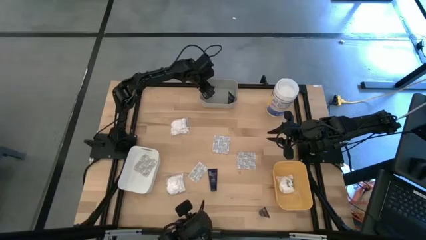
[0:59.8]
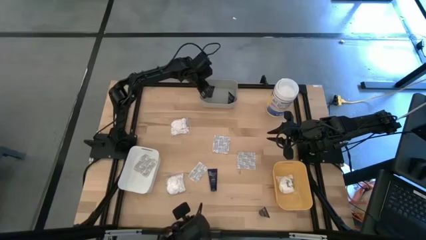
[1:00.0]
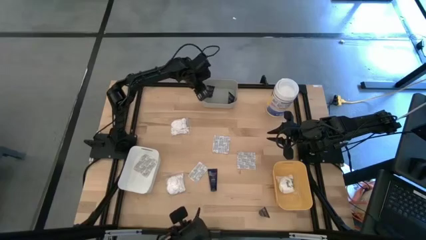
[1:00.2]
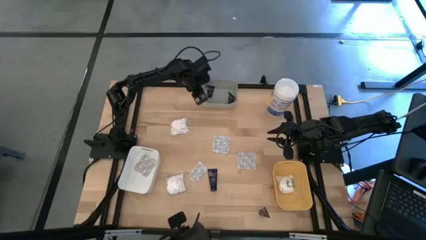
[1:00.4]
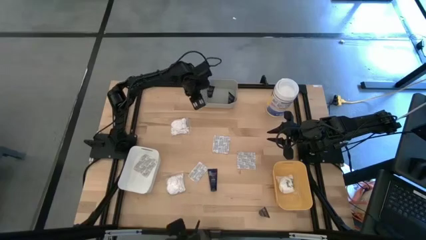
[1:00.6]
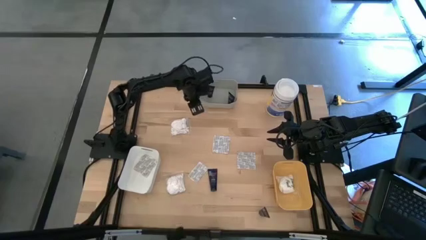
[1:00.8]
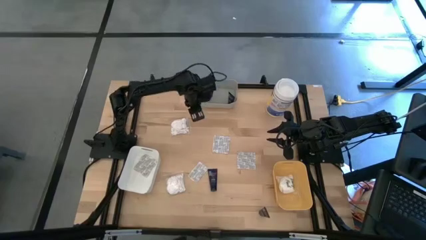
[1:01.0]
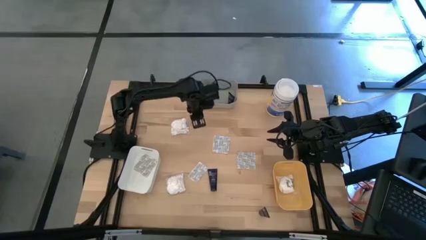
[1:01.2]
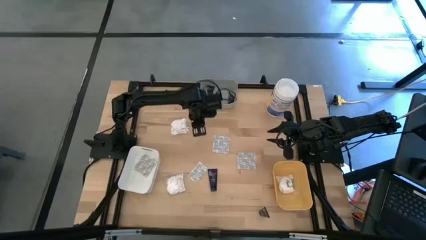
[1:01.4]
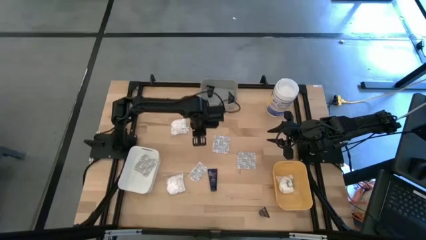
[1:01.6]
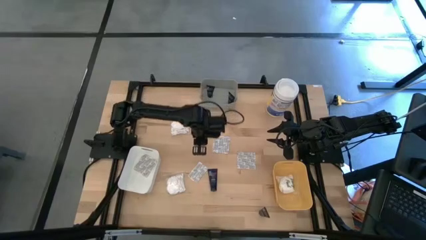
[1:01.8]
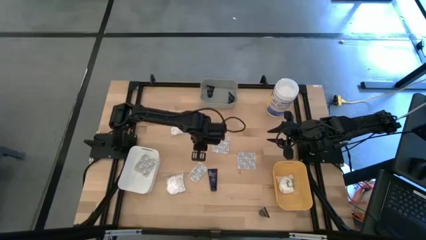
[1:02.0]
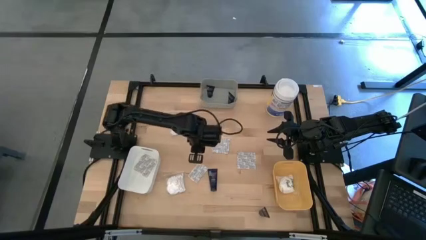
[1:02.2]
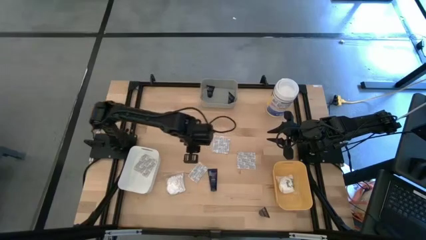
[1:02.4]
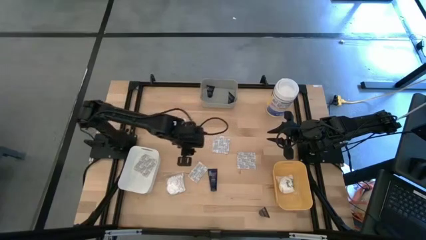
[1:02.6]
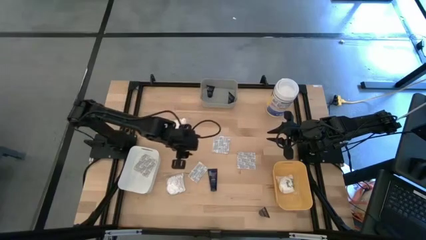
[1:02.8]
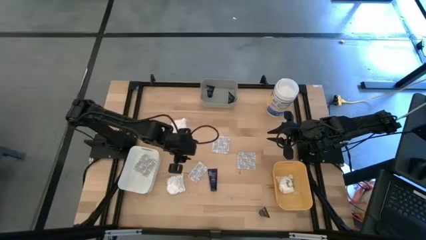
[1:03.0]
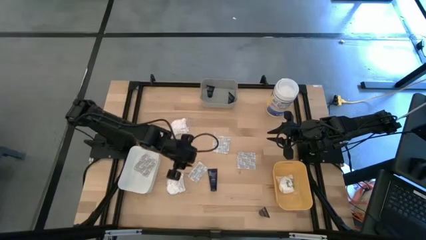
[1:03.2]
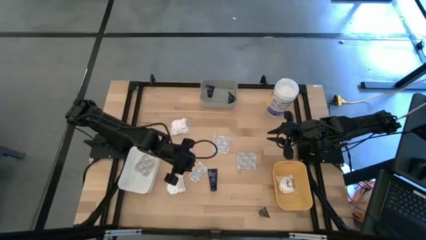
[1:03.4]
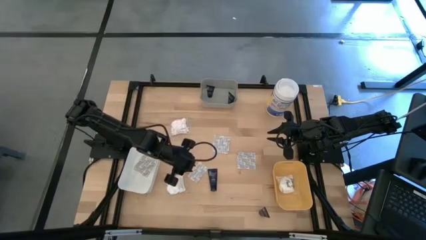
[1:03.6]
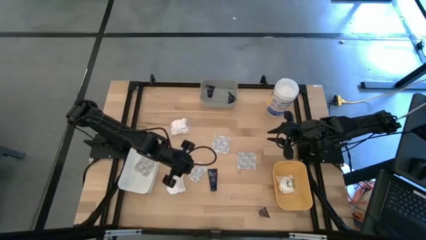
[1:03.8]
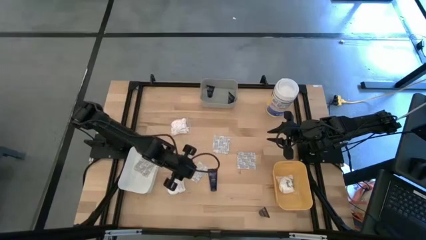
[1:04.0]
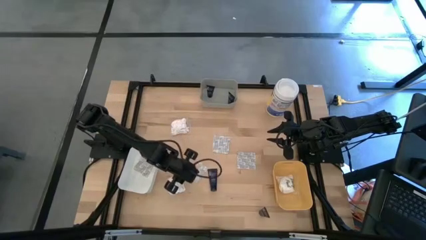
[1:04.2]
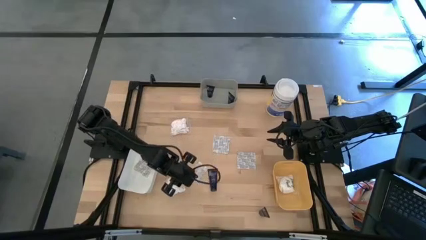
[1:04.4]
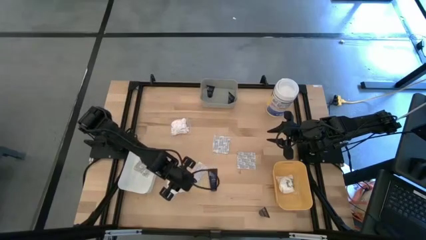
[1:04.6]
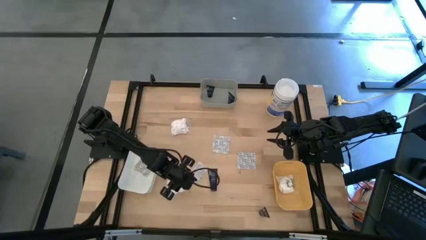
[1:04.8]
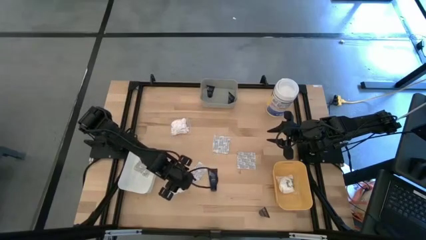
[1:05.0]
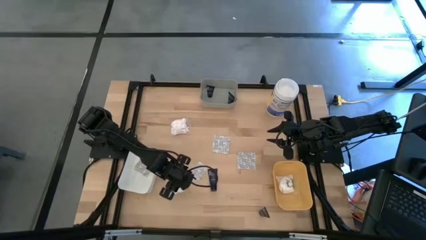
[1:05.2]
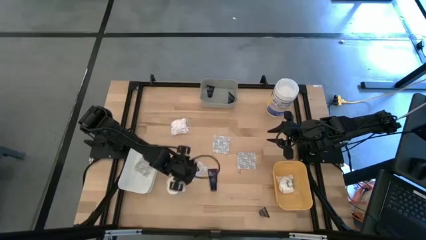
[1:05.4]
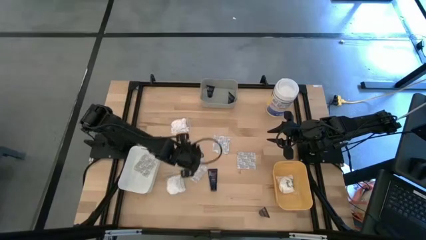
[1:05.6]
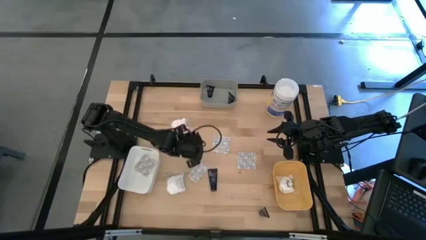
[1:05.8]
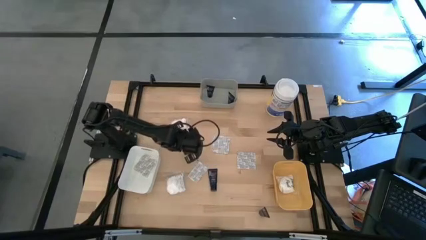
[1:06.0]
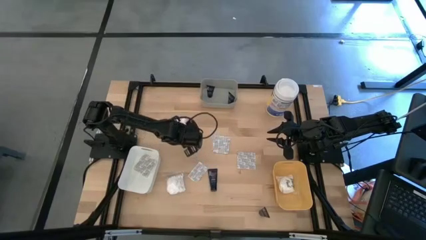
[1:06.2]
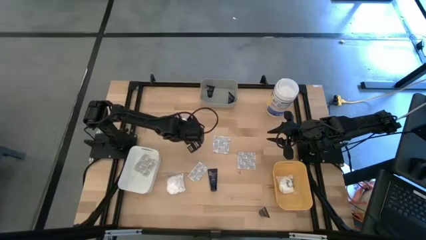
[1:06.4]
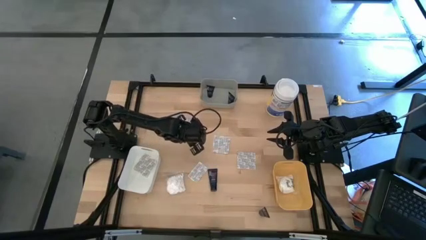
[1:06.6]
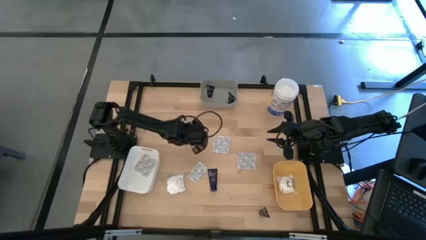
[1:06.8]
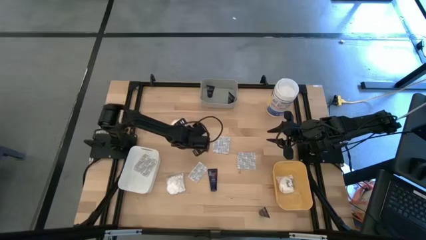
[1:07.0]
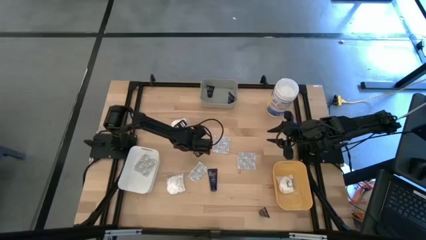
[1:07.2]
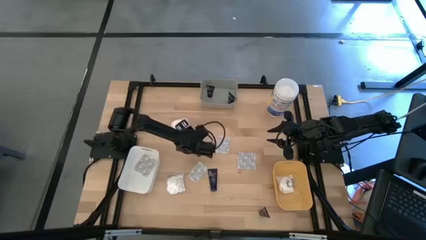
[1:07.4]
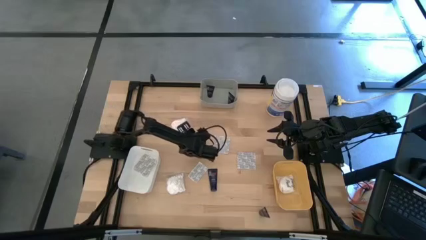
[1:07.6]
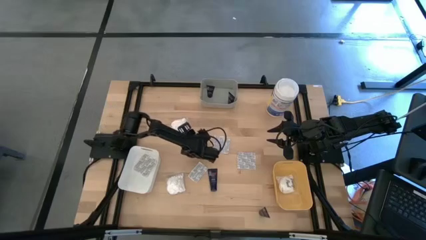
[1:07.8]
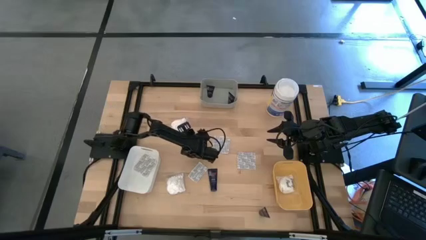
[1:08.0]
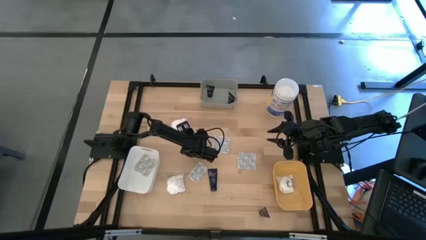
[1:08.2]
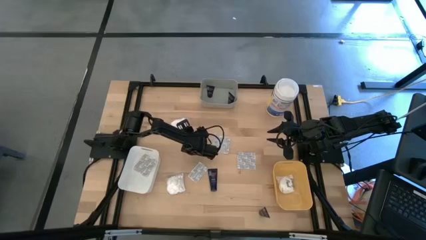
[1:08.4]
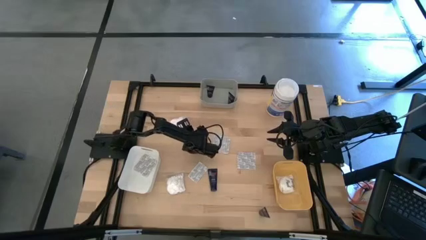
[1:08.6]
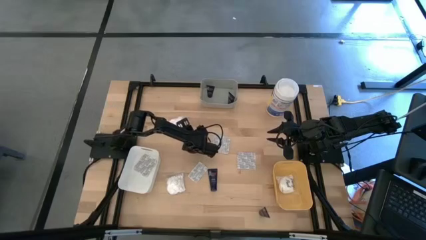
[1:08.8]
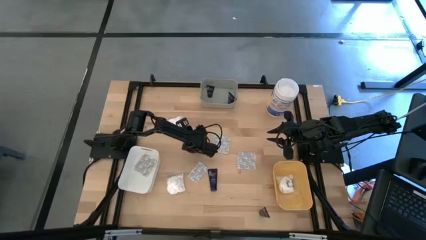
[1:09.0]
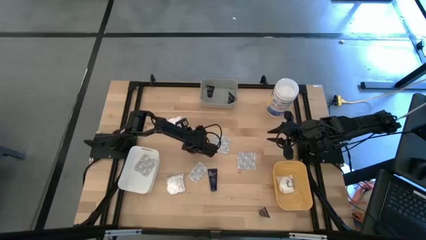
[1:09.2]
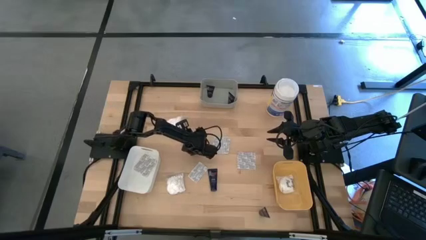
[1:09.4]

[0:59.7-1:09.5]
Task: Pick & Place Travel size toiletries
Put the top cotton pack into the yellow bin

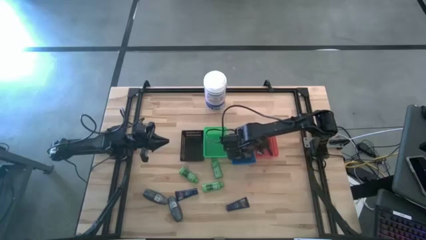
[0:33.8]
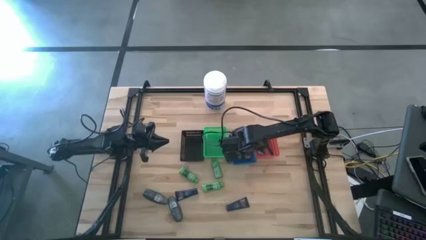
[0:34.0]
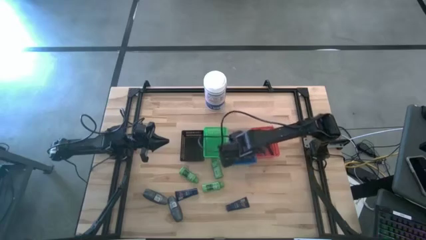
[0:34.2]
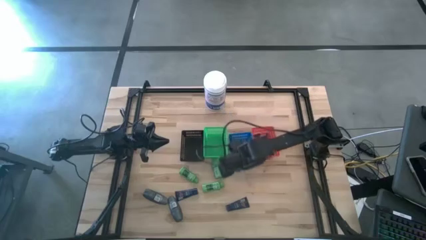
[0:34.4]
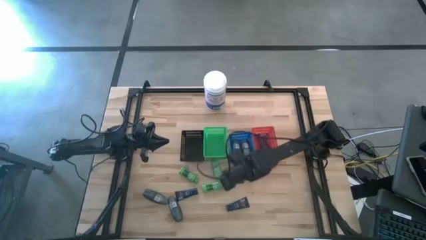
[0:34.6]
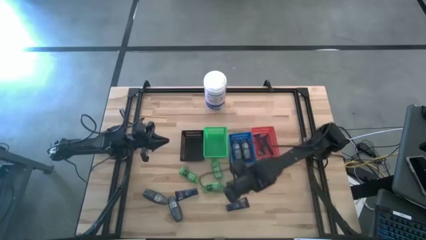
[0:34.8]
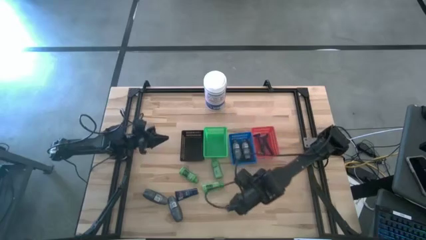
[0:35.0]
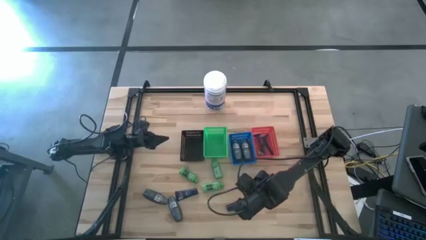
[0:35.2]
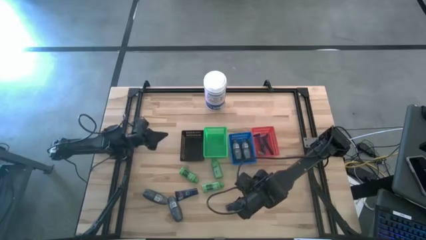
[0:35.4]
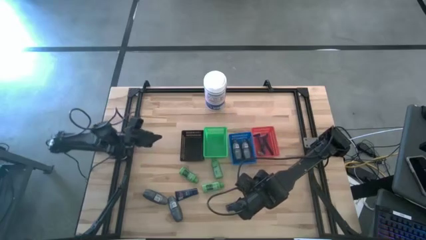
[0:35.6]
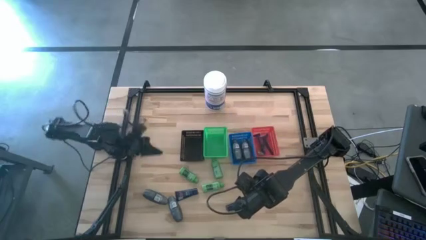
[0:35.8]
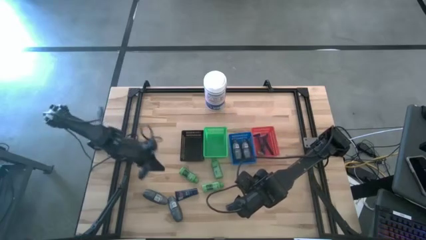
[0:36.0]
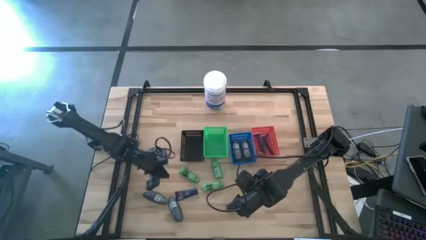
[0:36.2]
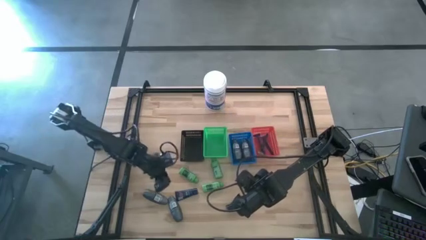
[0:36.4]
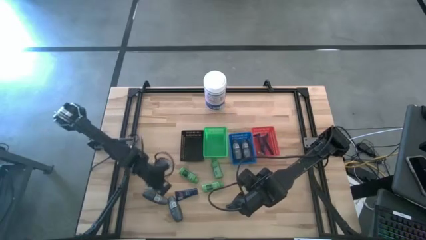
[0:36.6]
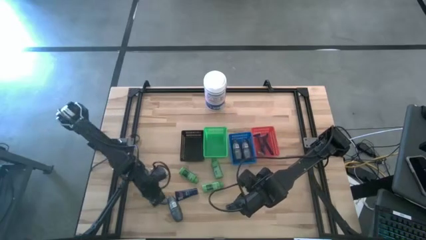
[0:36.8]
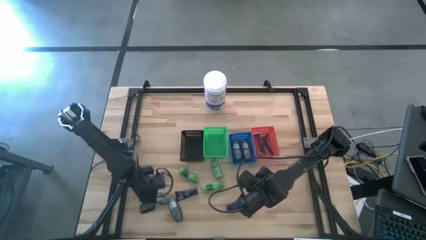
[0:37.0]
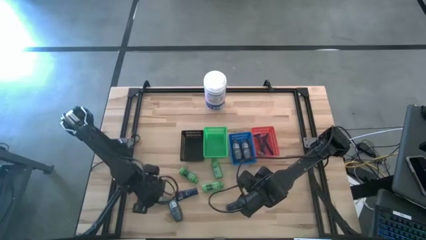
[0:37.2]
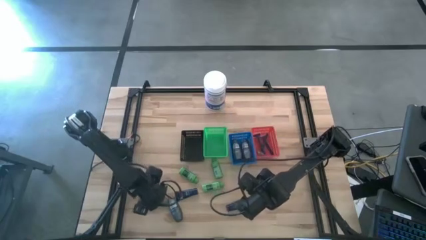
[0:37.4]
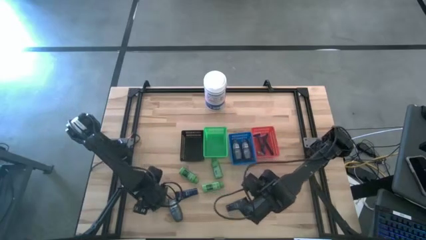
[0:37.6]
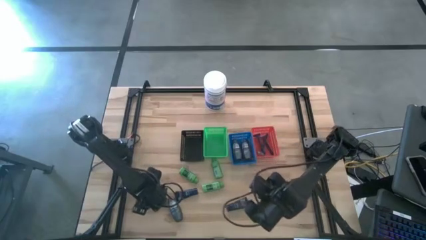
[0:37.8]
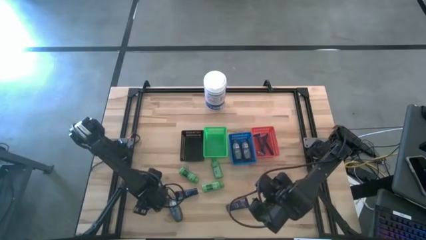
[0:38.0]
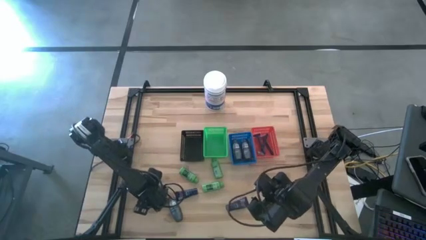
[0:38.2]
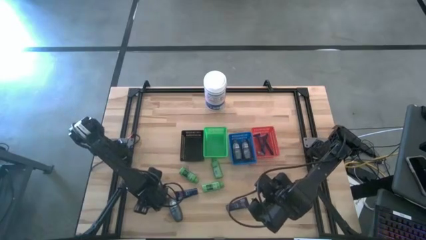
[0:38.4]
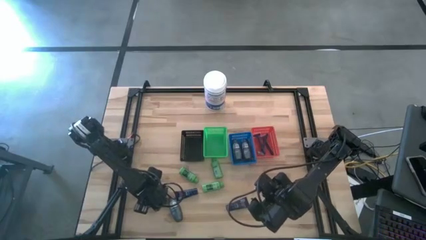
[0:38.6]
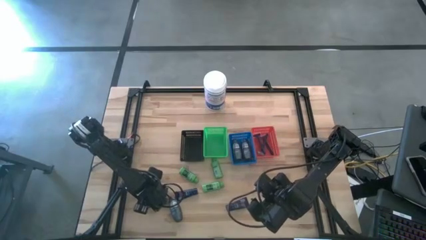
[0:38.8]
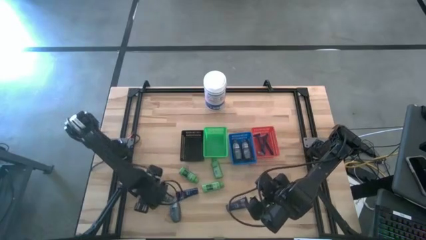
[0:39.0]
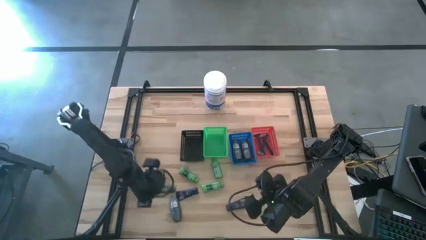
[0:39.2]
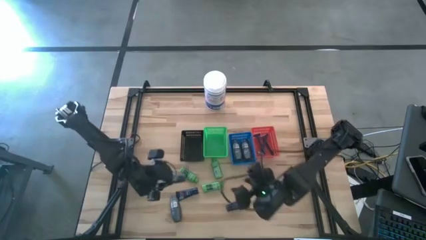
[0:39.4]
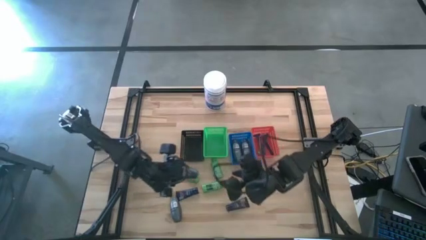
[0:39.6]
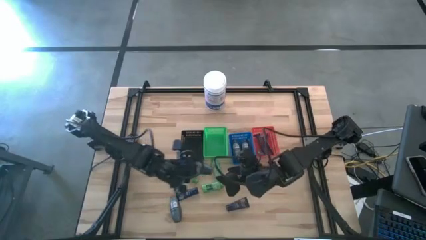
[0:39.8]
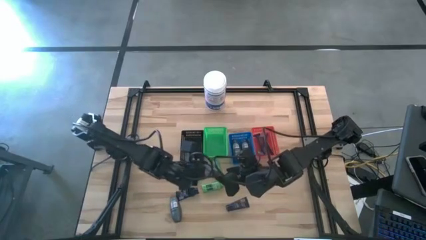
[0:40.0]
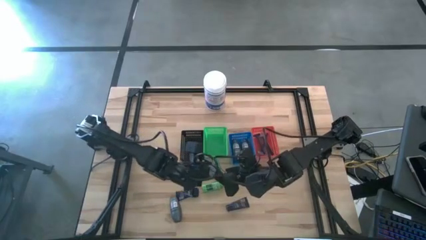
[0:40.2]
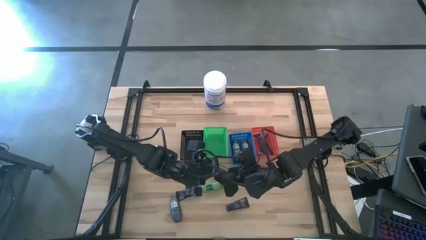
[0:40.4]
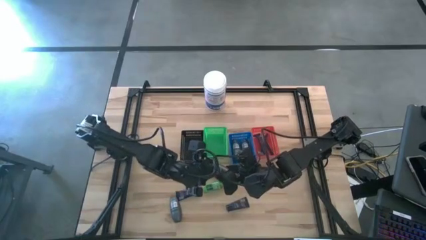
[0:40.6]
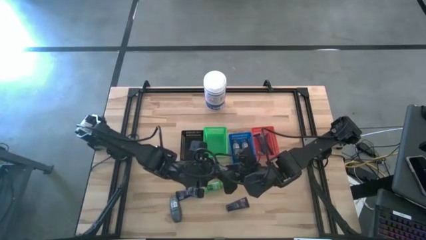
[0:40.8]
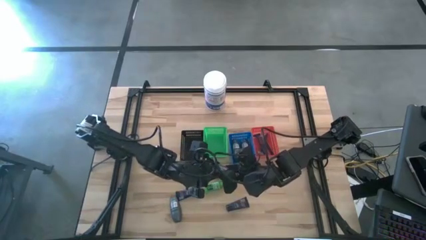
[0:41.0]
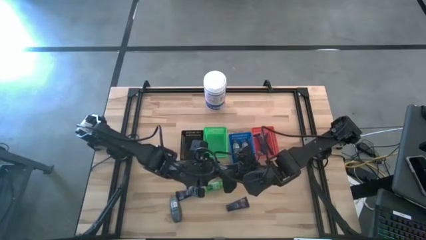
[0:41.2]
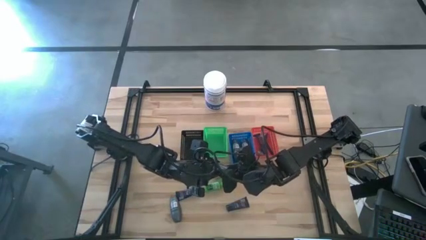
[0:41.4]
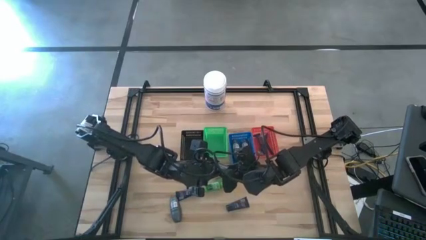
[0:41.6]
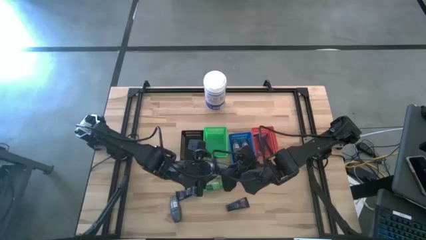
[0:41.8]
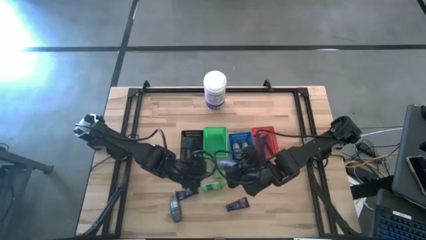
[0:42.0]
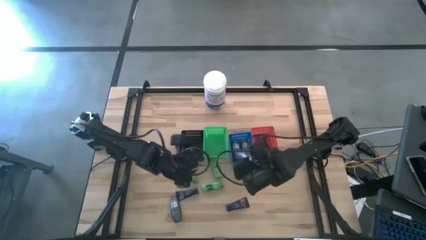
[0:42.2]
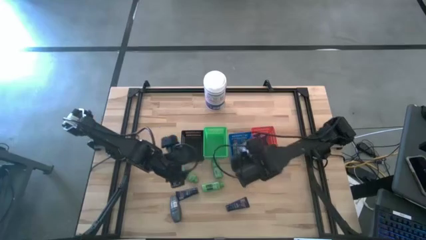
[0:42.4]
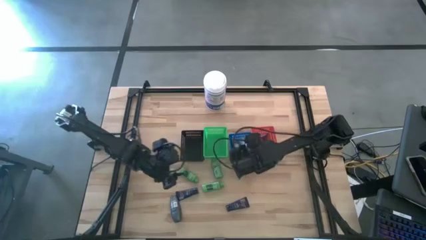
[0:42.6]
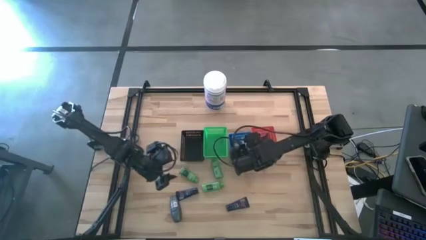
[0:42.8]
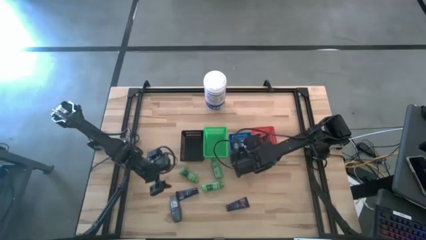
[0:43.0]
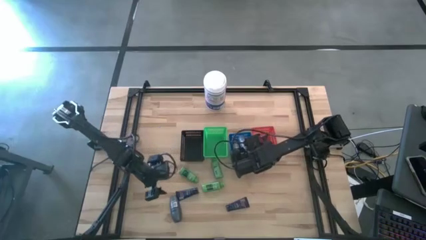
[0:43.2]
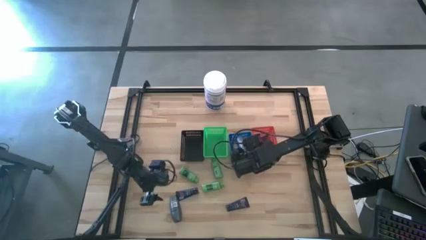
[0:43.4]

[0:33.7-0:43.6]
Task: Pick & Place Travel size toiletries
Put the deodorant into the blue basket
